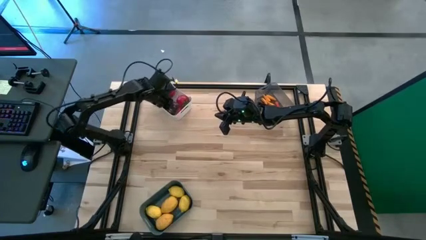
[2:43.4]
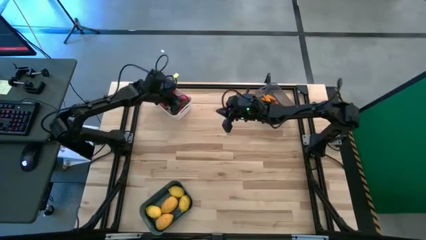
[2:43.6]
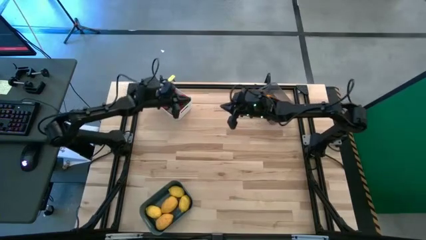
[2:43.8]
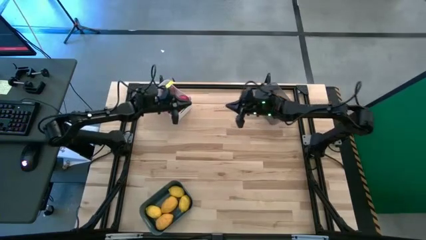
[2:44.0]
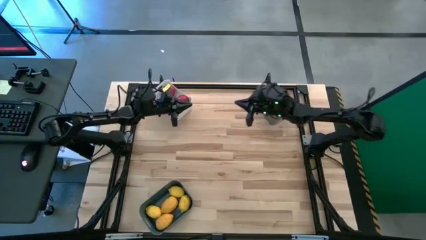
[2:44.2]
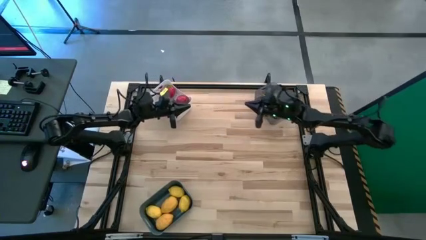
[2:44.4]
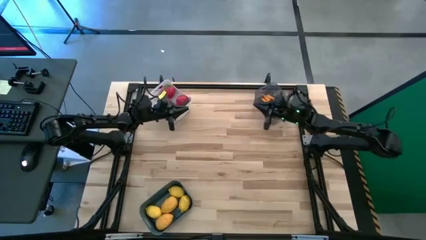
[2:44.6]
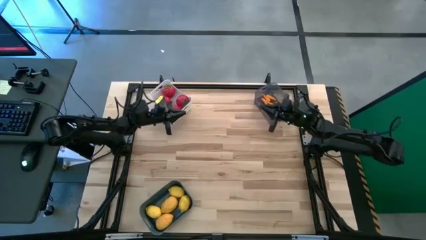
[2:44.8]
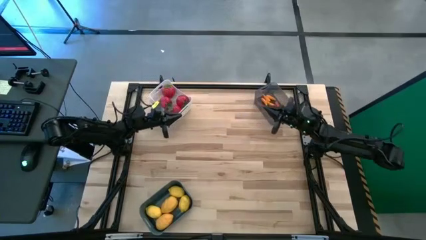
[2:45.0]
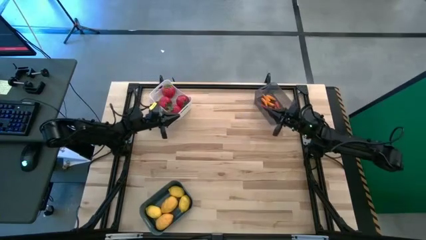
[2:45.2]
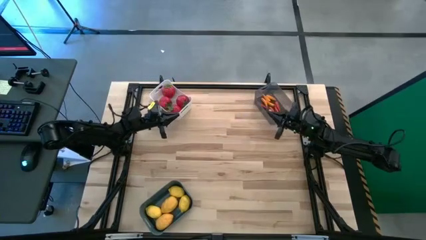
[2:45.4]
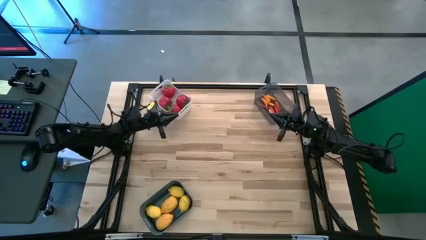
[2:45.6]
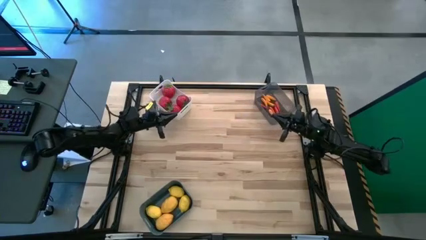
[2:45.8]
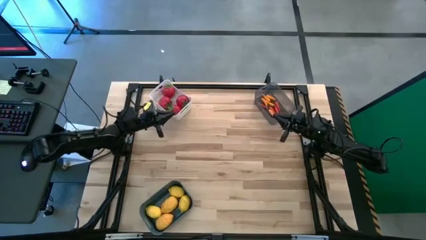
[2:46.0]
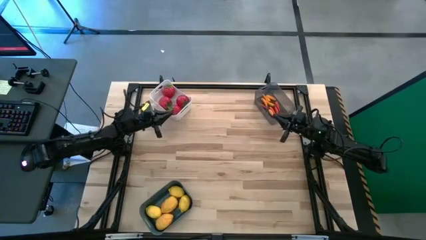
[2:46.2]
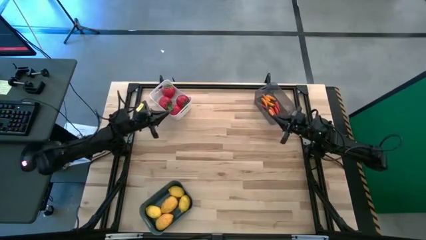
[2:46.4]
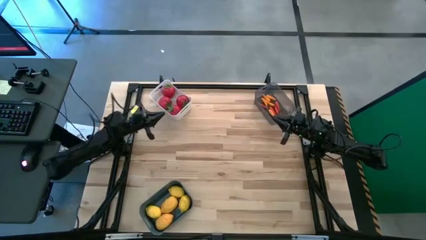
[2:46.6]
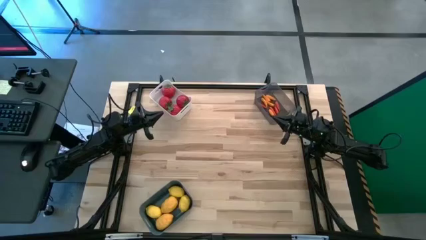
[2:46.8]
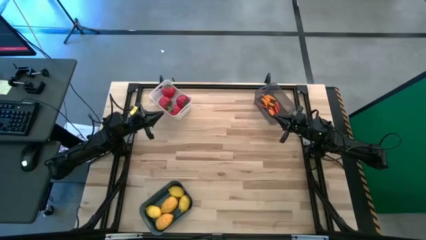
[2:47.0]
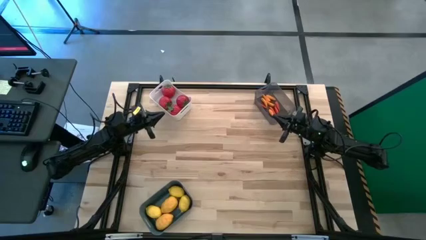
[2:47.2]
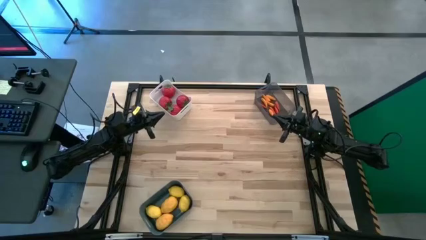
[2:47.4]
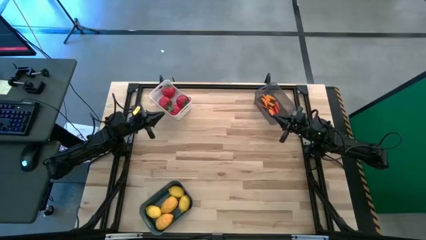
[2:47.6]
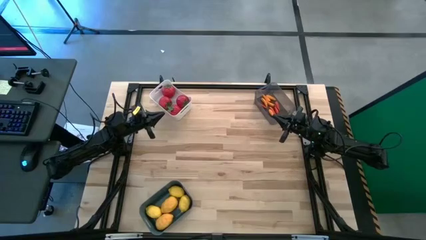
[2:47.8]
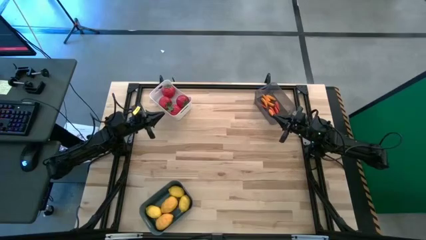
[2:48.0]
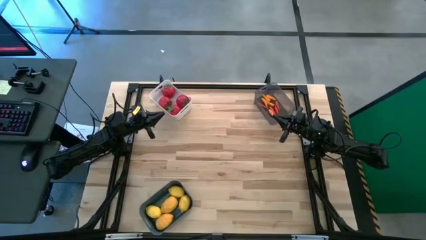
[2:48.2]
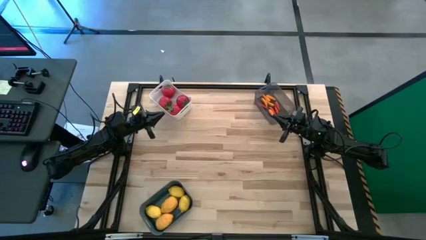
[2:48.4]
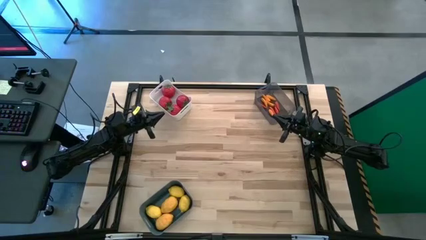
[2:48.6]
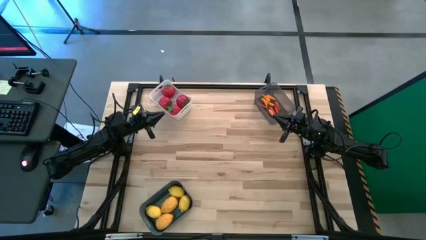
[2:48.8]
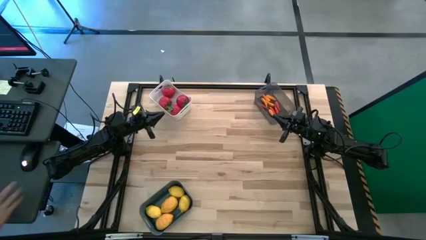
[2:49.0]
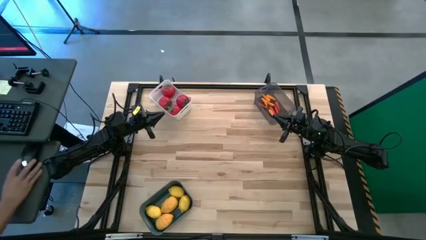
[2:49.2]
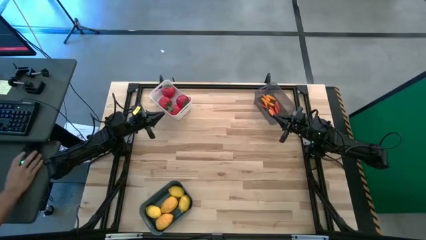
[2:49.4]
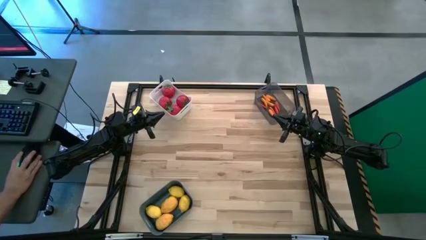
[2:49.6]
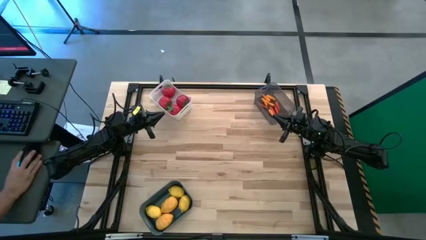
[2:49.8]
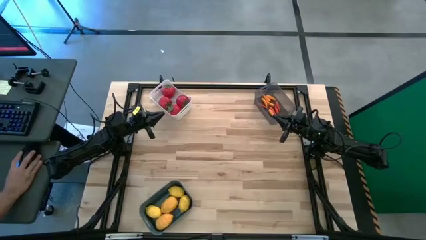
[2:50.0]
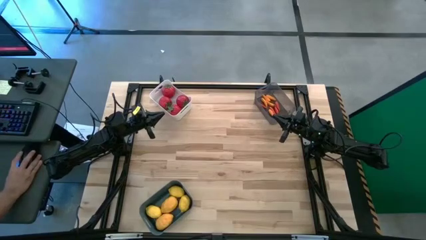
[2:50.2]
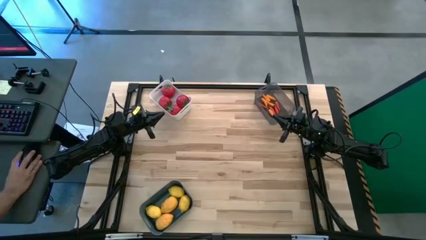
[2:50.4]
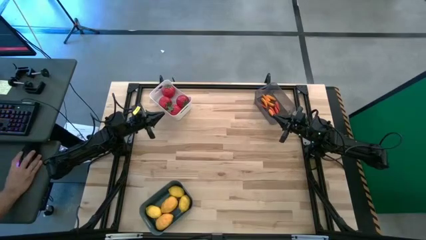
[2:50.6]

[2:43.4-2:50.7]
Task: Sort produce into baskets
Return to Home Position

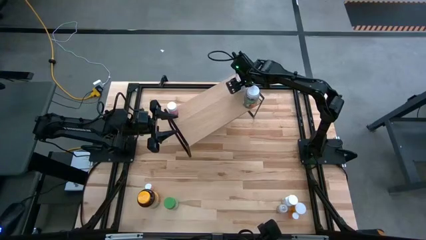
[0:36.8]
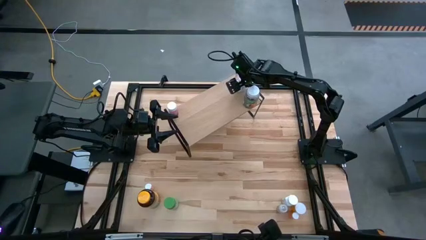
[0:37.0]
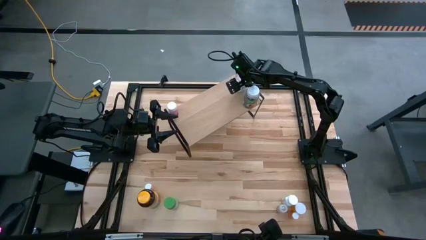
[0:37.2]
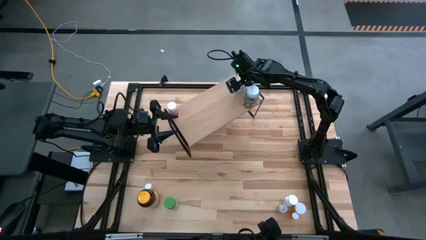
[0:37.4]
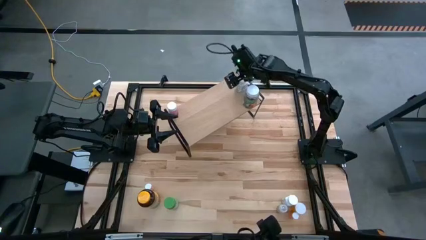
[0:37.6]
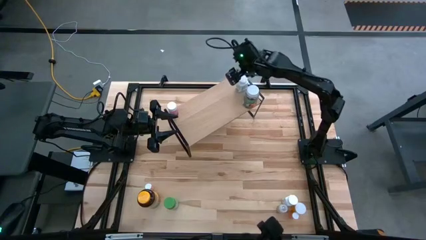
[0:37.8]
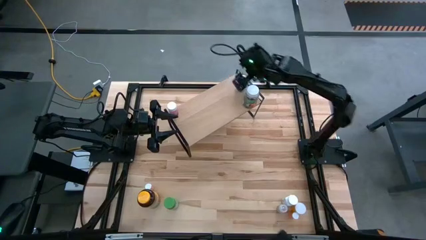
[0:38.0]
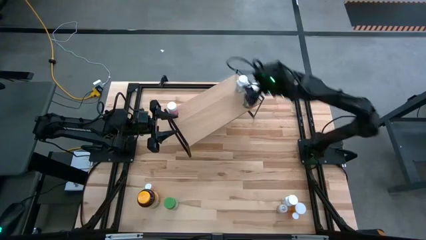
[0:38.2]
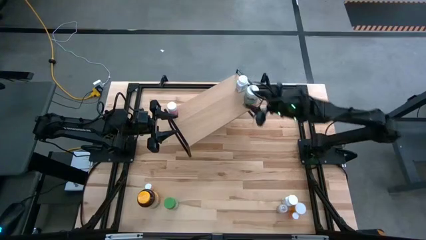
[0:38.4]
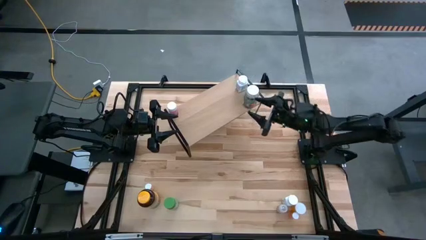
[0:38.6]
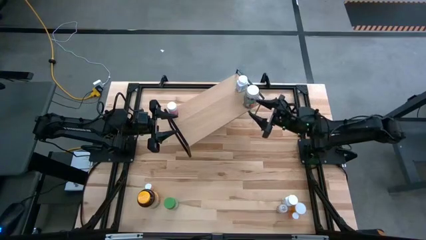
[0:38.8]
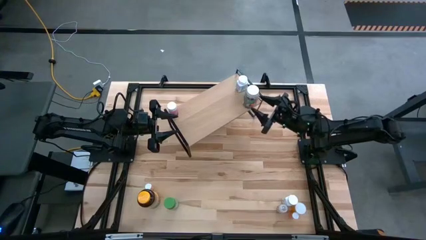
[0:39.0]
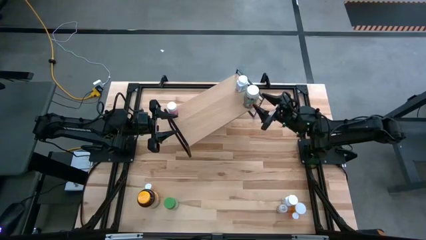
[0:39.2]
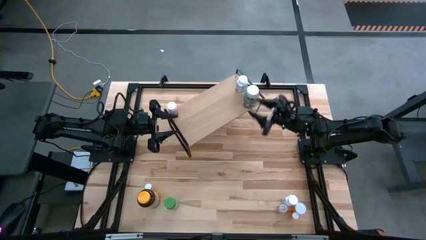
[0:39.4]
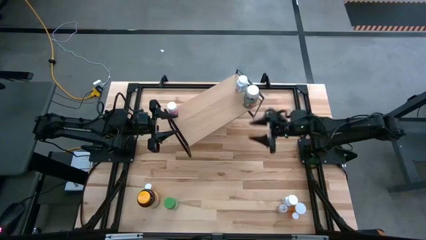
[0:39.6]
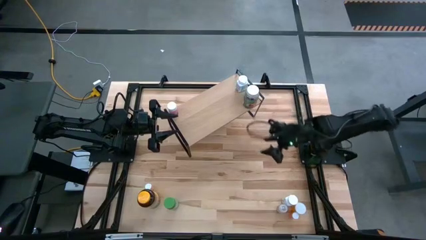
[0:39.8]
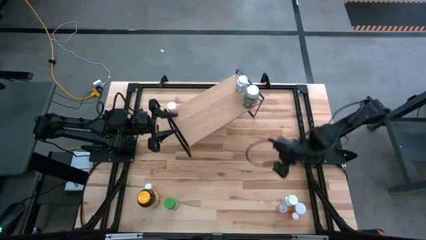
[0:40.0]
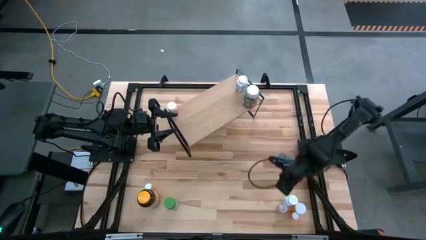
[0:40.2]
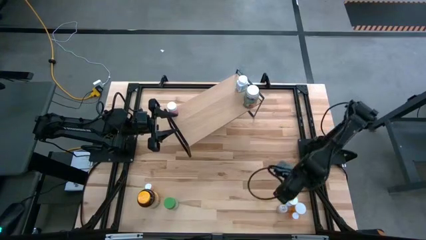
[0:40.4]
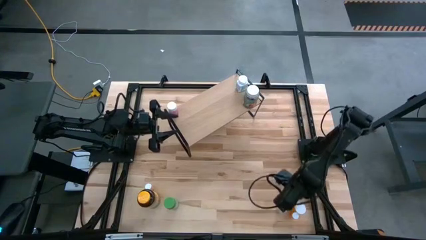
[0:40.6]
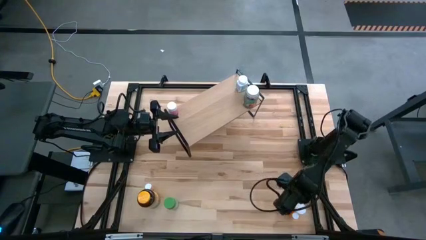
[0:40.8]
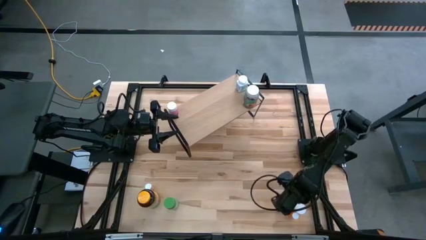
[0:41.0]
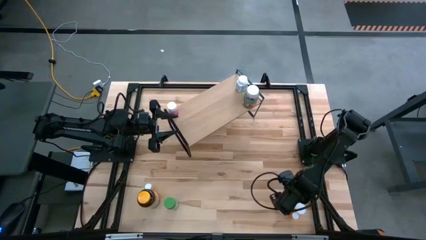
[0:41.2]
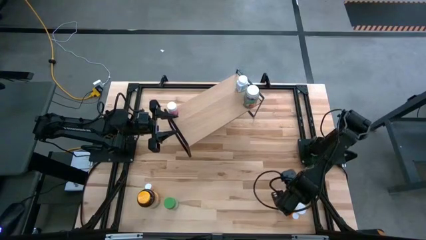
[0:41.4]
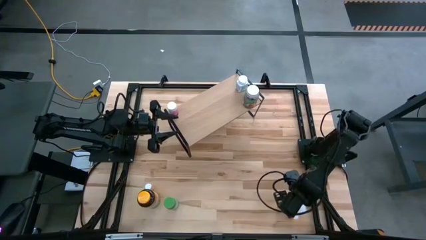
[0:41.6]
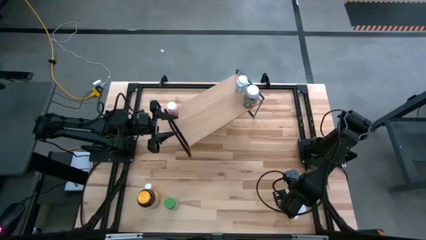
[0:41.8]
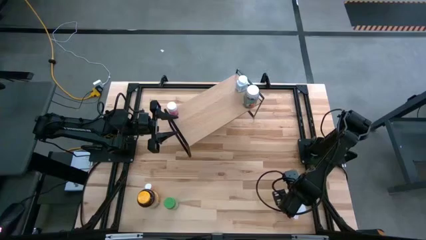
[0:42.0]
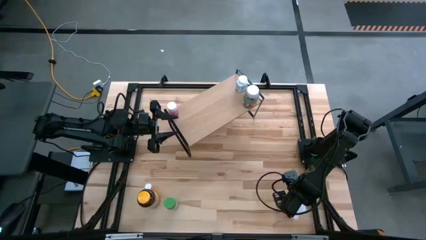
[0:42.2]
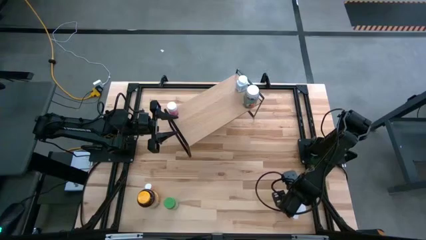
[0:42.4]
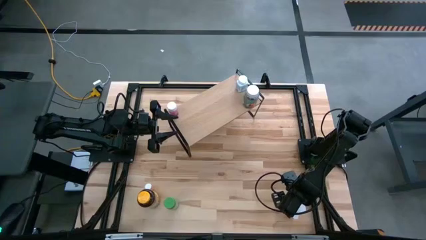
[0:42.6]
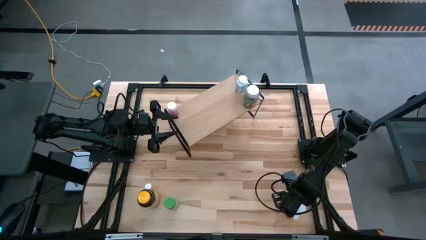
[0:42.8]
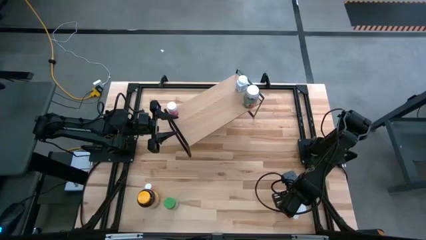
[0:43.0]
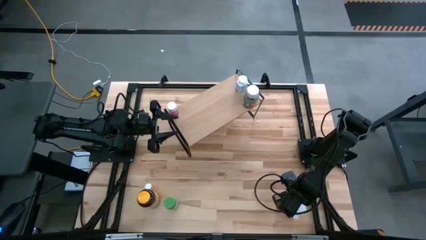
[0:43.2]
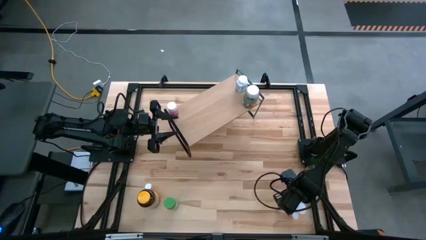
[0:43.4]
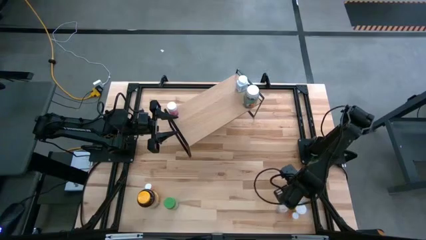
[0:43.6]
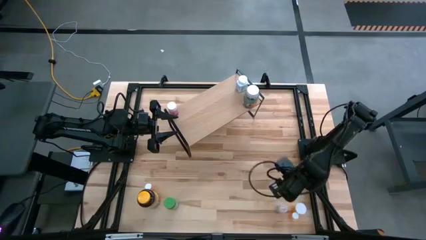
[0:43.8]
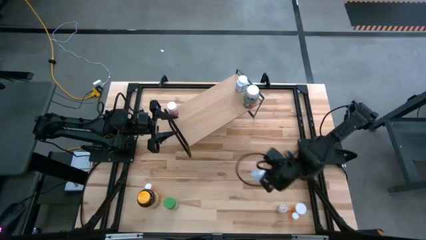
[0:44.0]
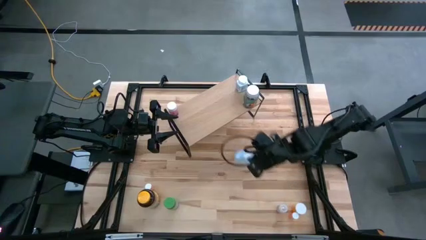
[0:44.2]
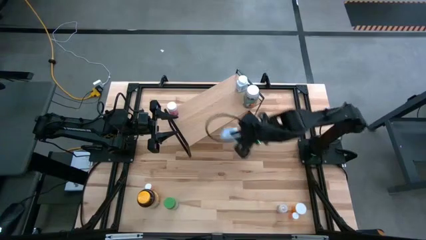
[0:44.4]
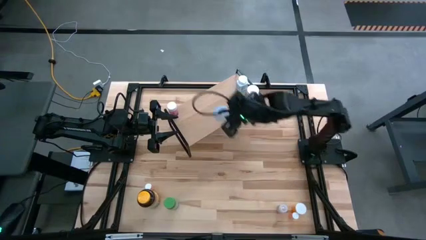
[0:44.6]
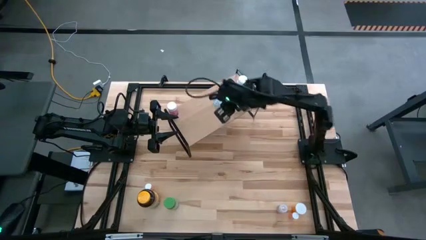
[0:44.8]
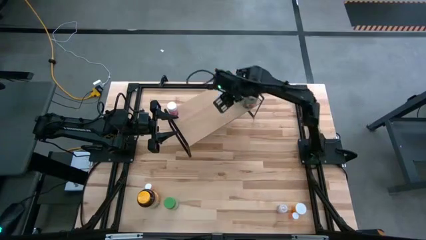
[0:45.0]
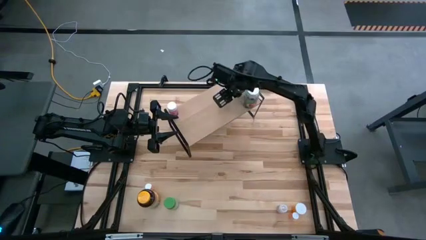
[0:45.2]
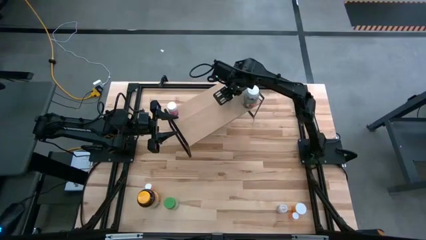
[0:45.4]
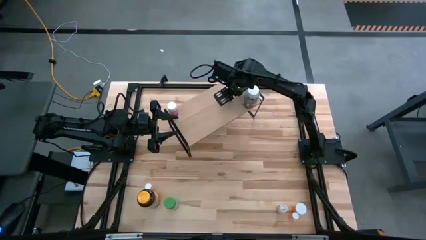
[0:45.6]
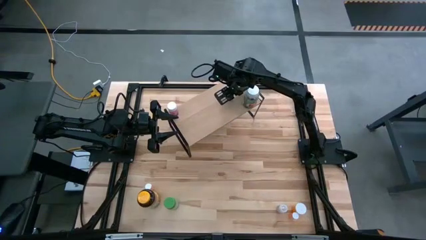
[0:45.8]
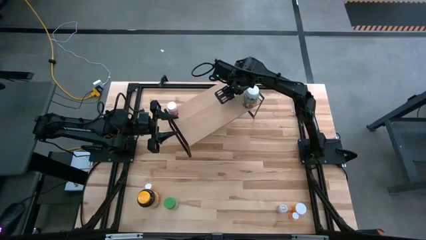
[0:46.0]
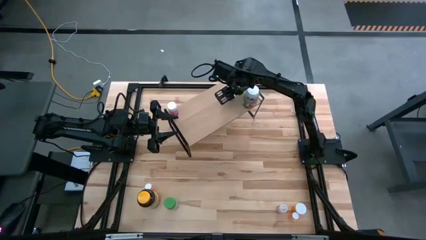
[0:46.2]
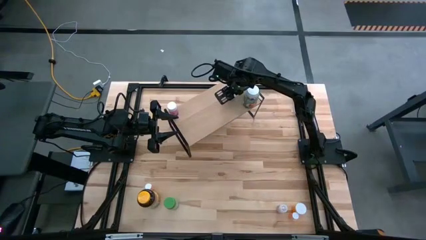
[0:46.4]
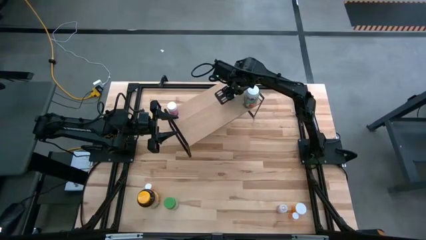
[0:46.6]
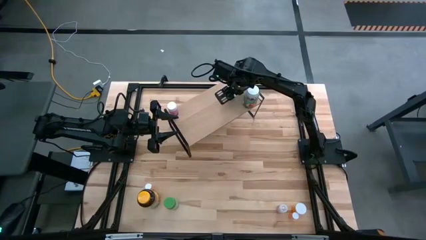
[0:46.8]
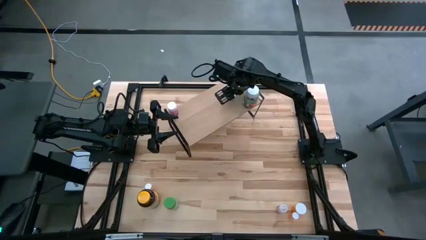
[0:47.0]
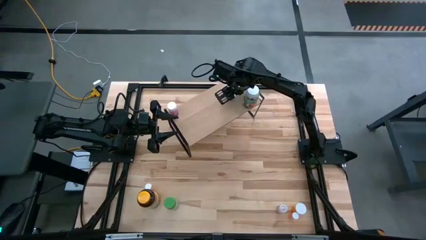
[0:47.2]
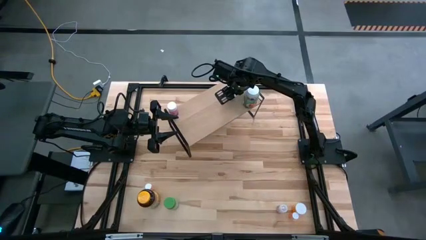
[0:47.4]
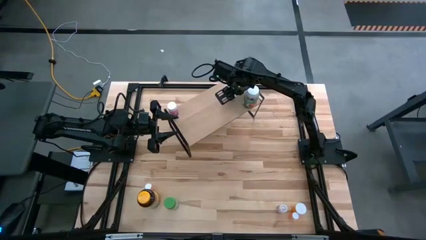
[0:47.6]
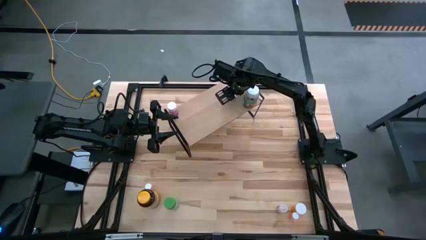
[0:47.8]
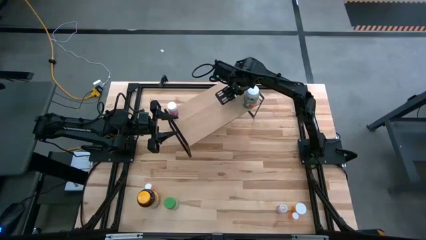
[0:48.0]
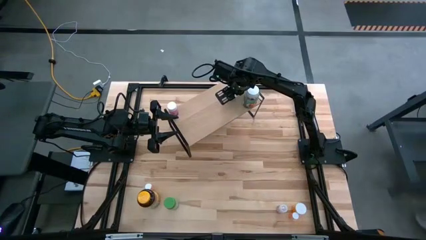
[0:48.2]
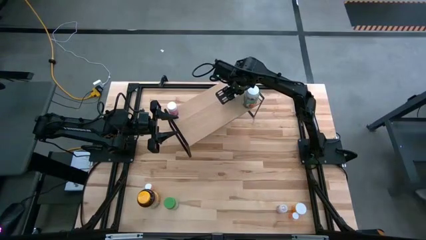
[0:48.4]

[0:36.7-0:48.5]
Task: Pick and place medicine bottles onto shelf by color
Put the blue medicine bottle on the shelf
